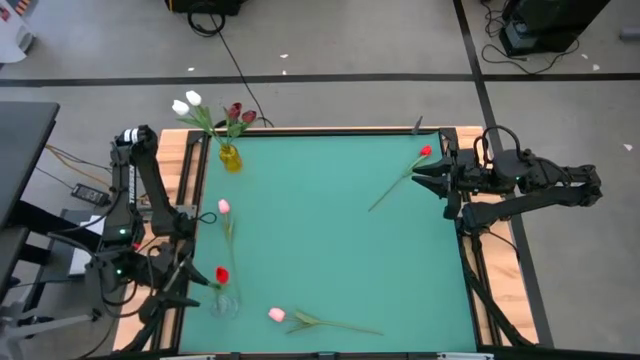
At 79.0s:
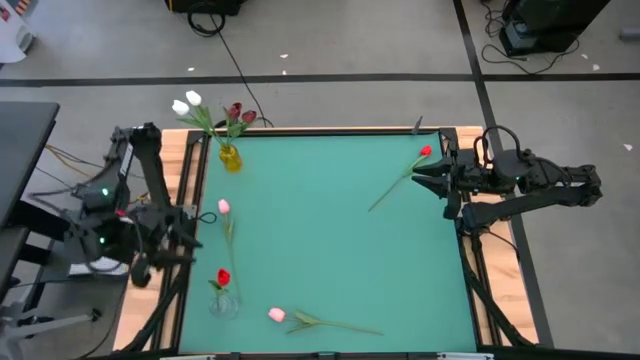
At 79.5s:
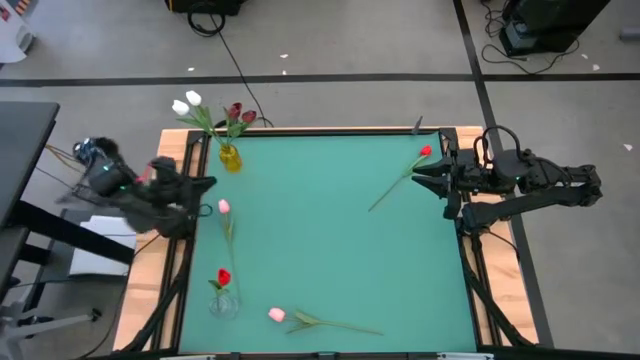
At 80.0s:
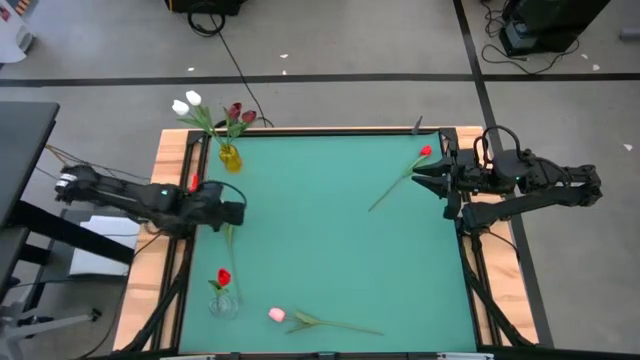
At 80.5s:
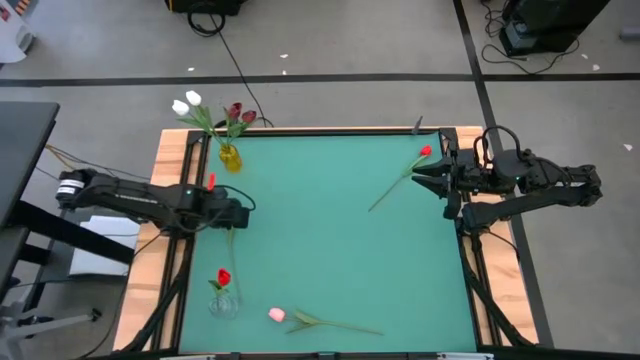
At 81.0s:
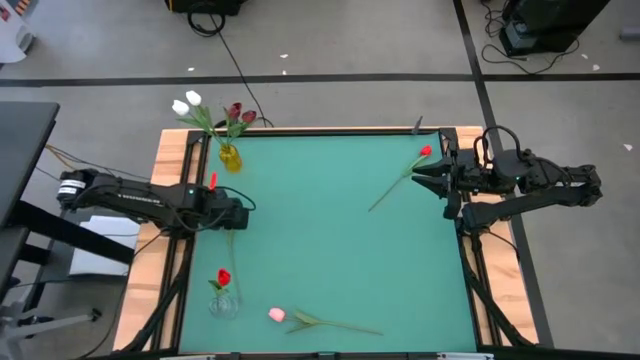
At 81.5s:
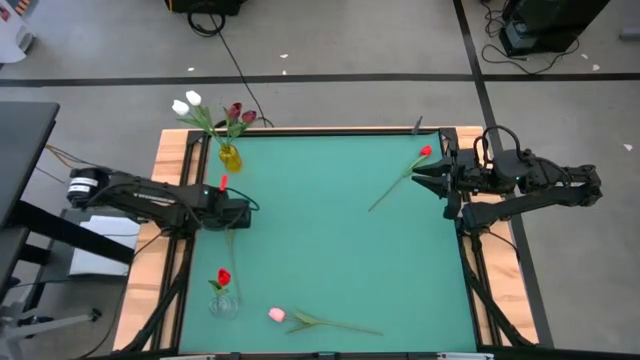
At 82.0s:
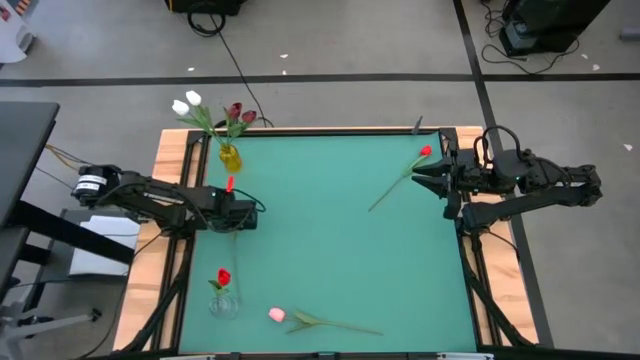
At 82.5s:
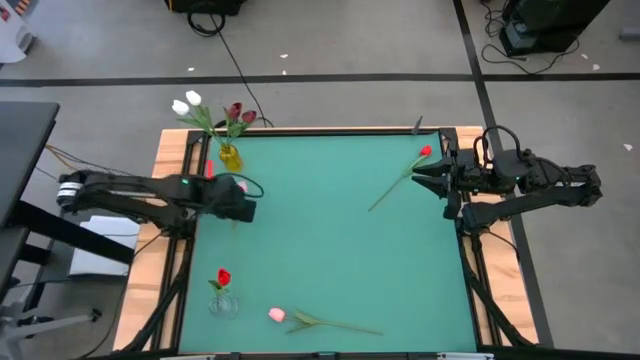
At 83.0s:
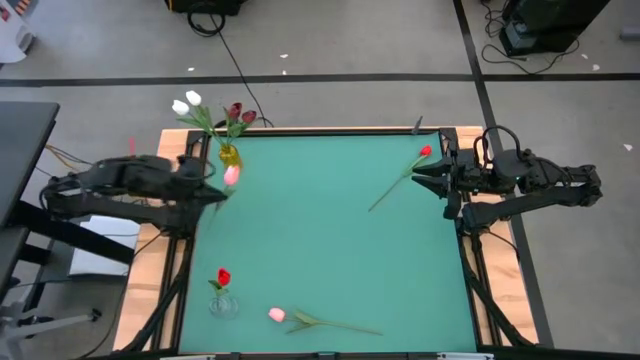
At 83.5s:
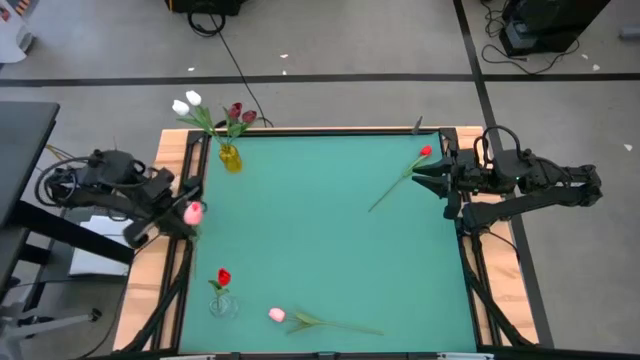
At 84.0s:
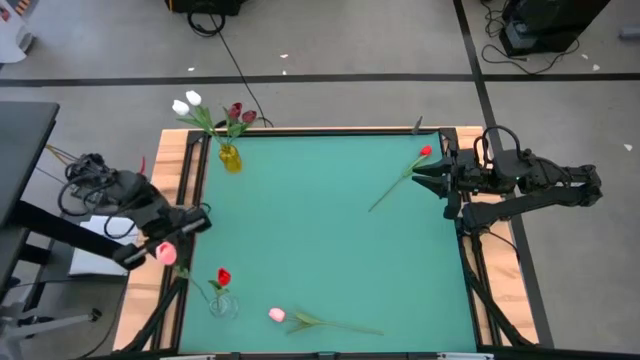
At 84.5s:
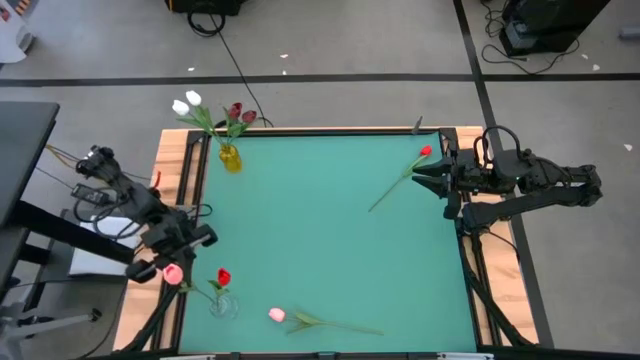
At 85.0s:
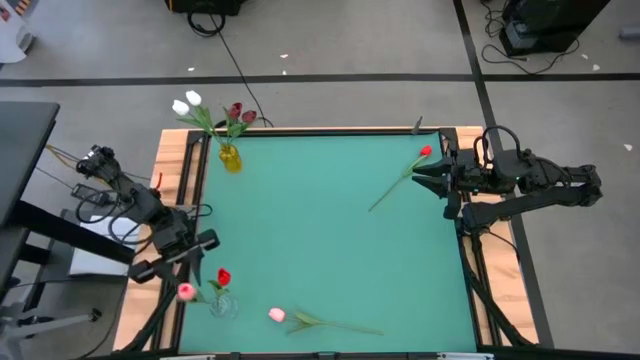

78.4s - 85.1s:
Task: Sort flowers into vase by color
Put the top pink flower into the transparent vase

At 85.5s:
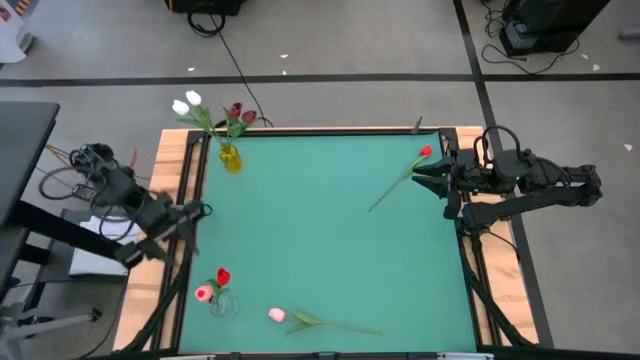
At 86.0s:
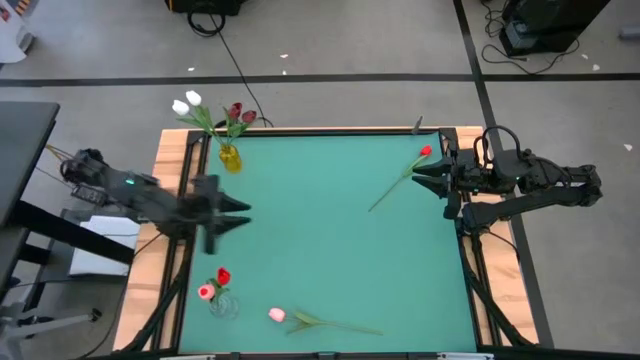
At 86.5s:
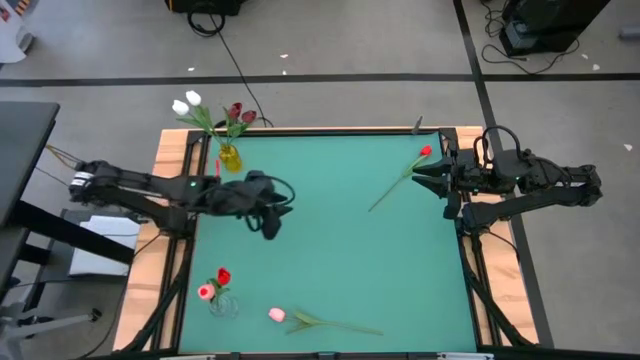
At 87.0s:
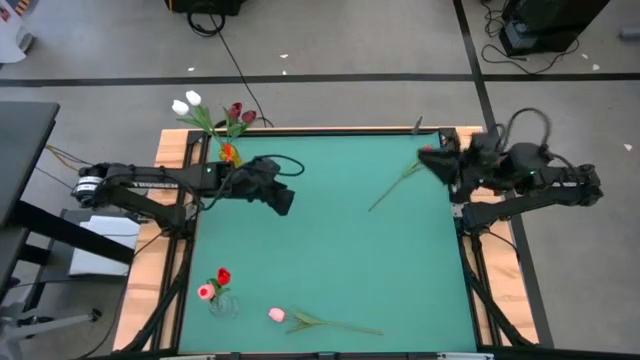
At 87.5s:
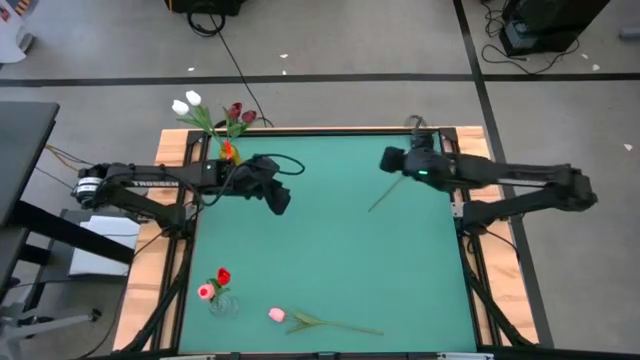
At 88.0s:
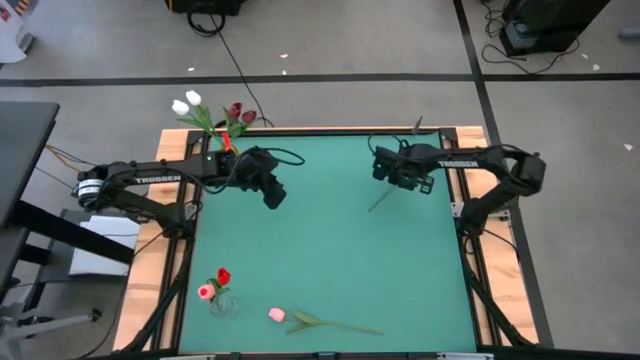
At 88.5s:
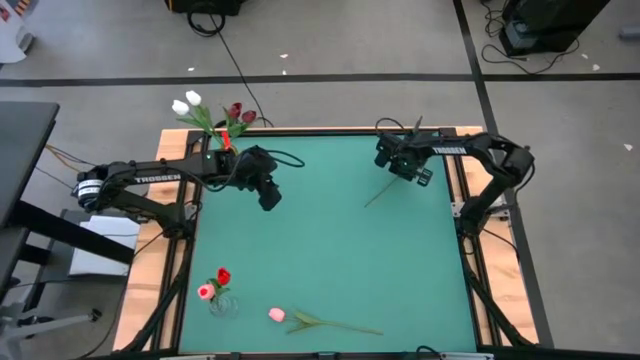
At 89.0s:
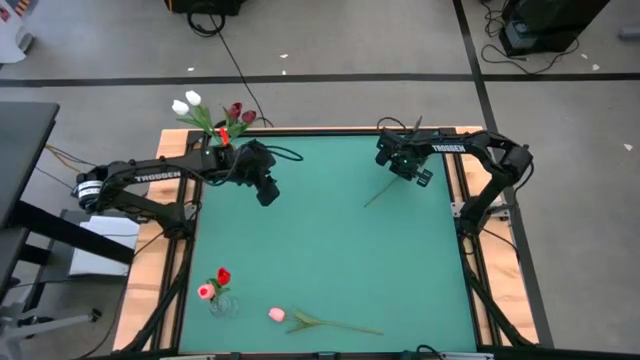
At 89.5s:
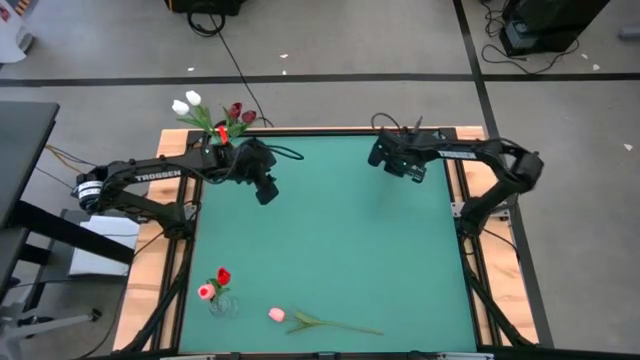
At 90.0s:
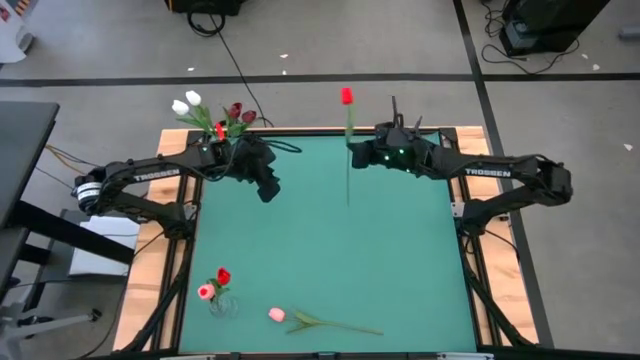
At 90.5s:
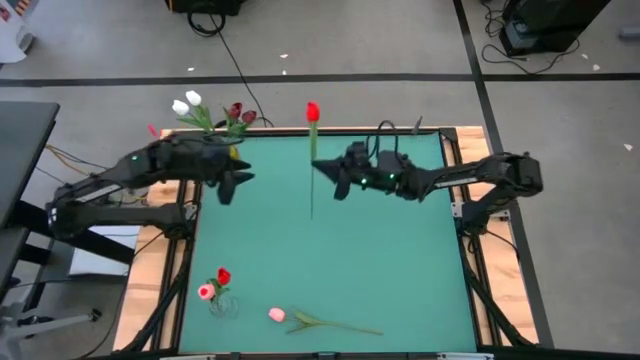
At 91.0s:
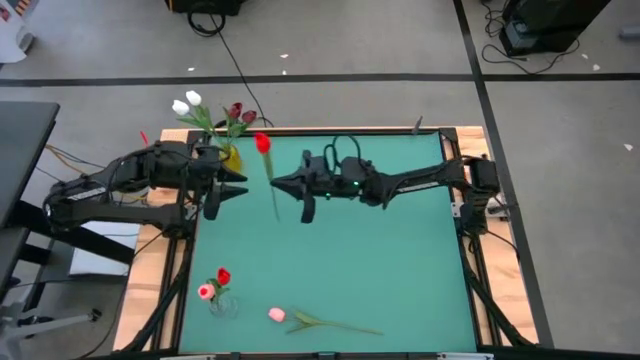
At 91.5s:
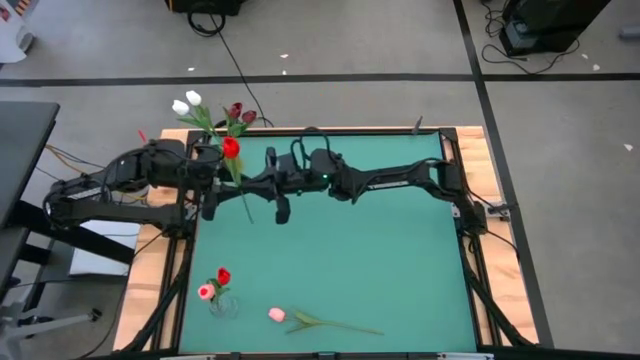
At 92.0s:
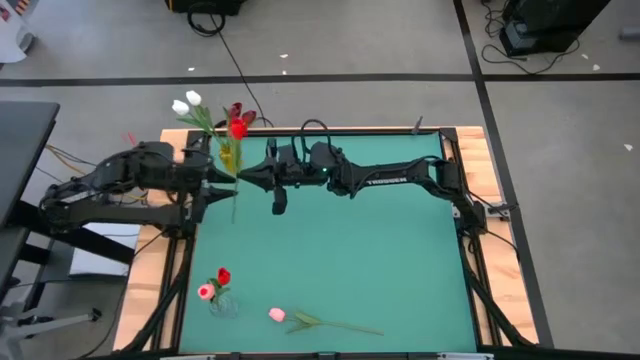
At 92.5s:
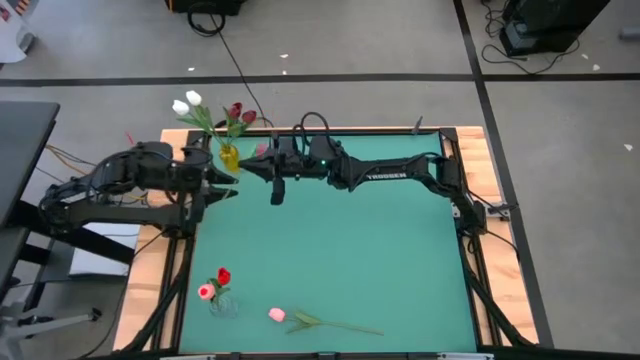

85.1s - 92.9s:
Put the red flower into the transparent vase

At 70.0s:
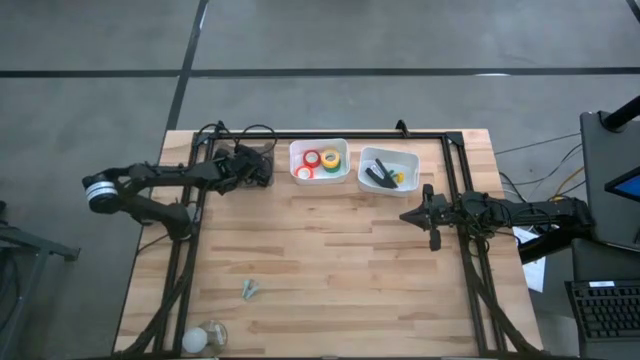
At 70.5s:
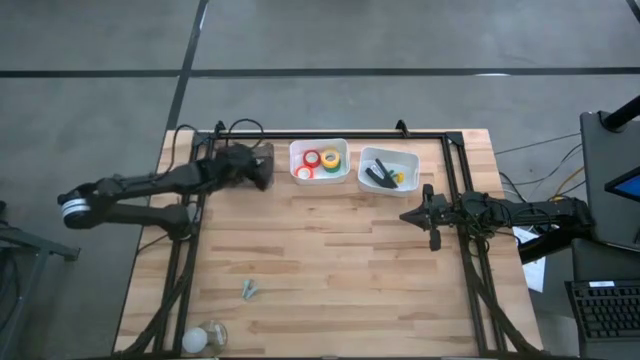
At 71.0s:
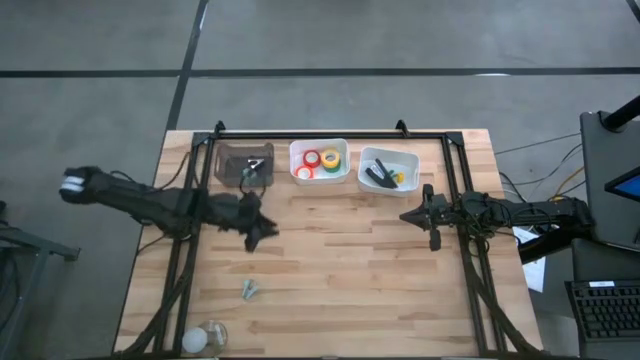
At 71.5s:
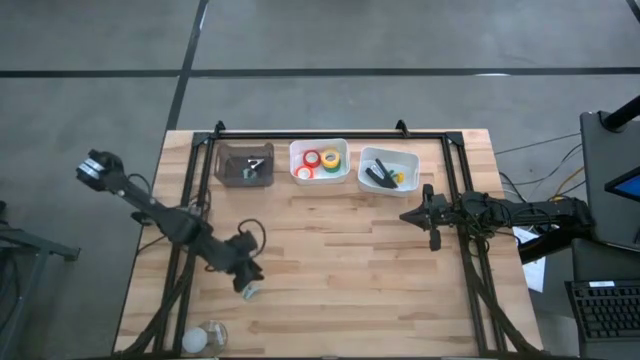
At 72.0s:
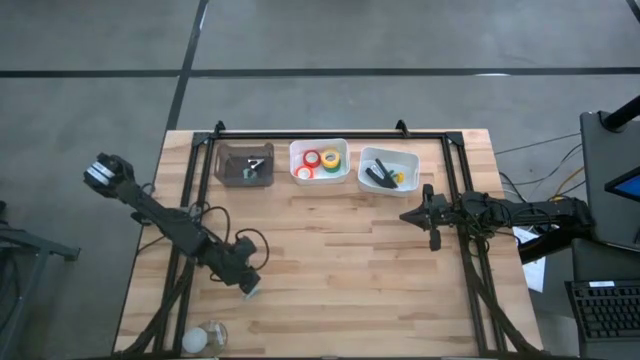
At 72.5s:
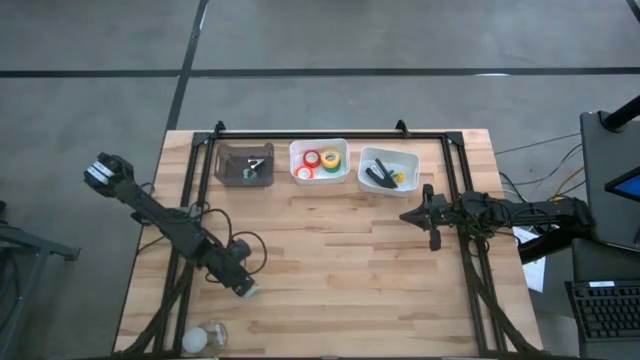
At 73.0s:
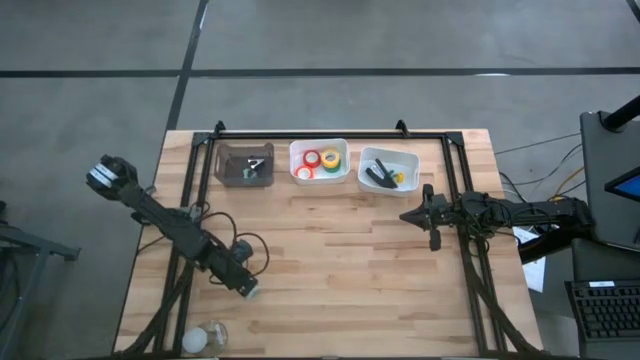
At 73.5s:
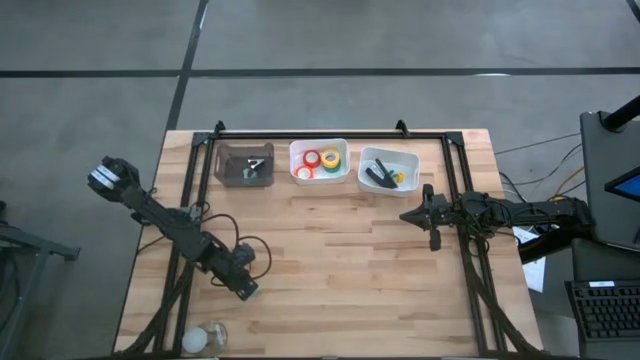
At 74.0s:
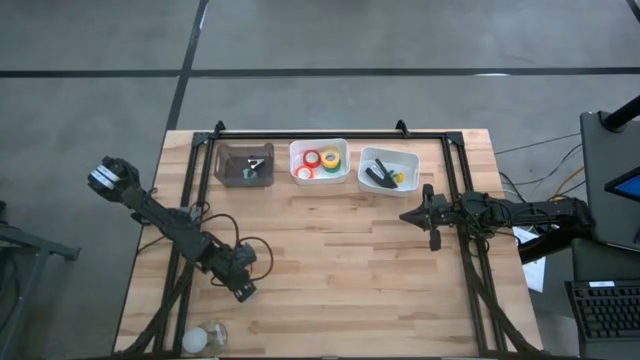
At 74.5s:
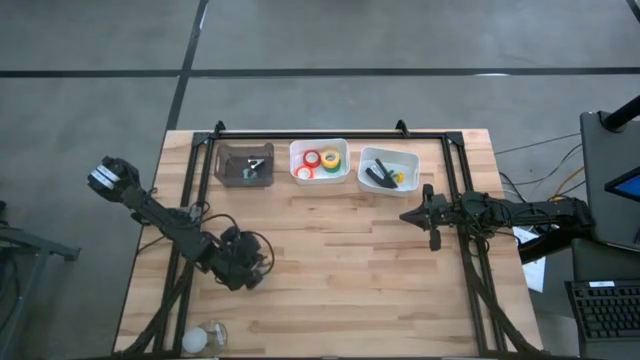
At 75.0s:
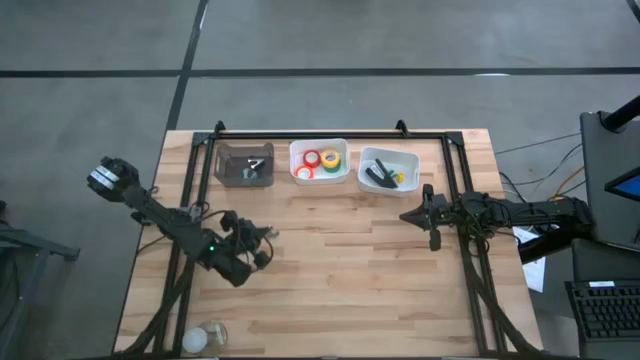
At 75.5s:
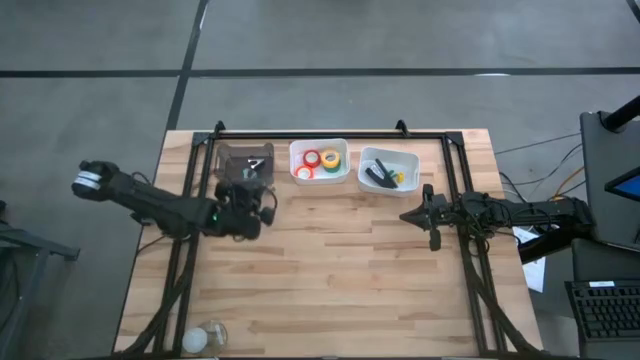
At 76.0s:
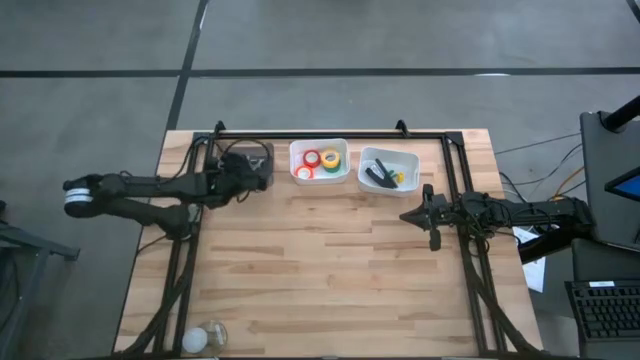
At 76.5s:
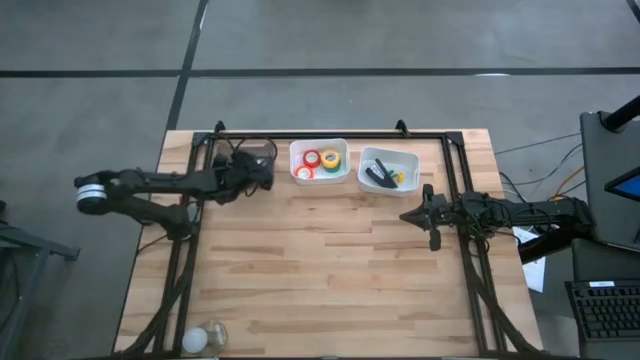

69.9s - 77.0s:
Task: Pick and place Stapler, Stapler remover, tape
Put the blue staple remover into the black bin
